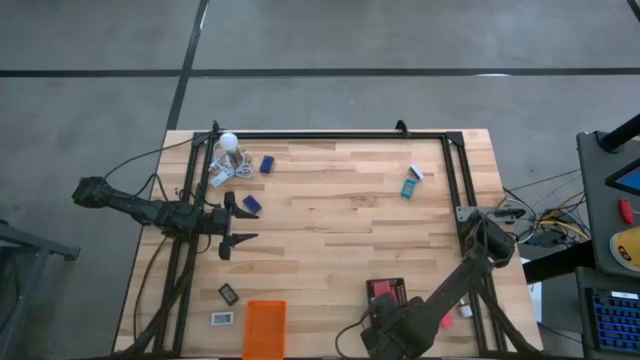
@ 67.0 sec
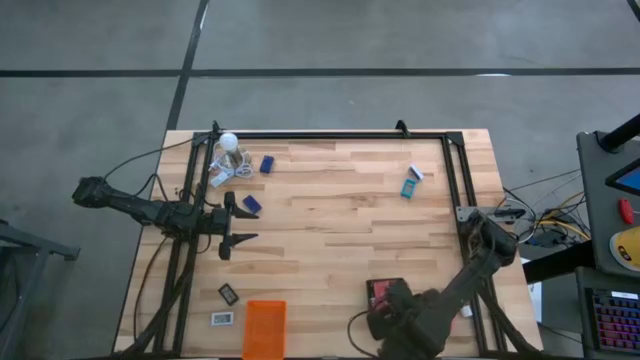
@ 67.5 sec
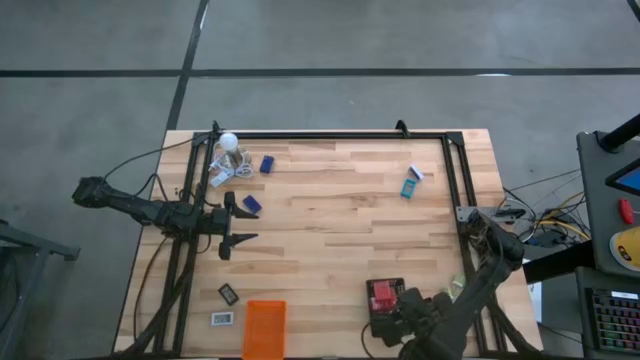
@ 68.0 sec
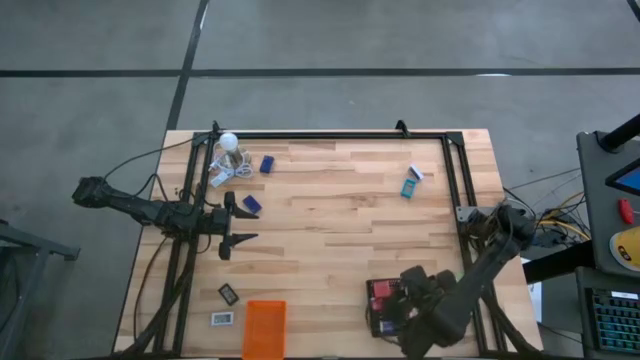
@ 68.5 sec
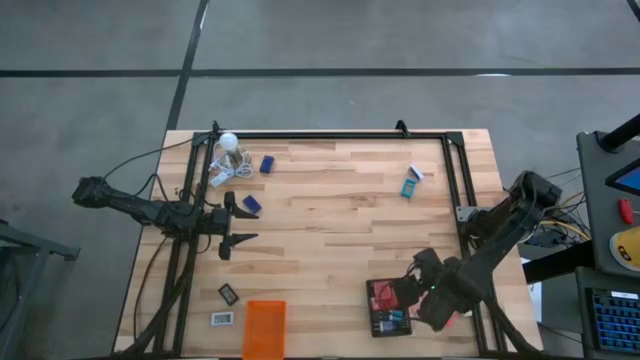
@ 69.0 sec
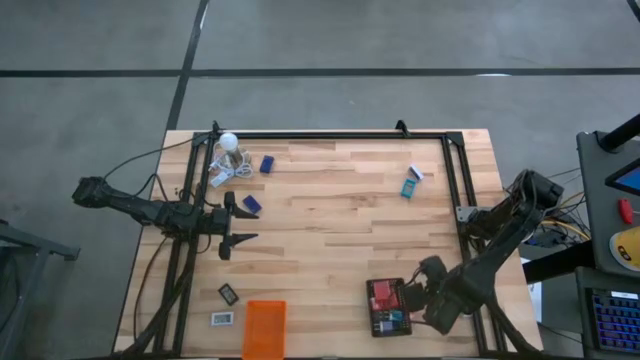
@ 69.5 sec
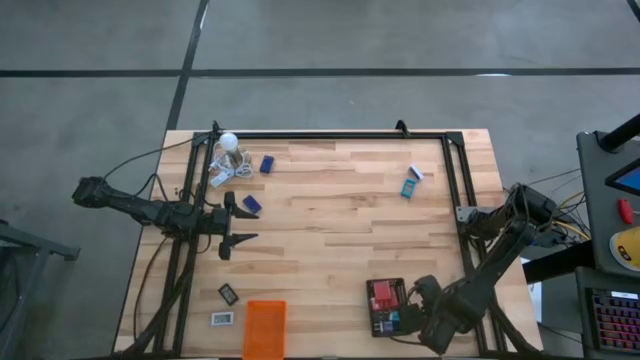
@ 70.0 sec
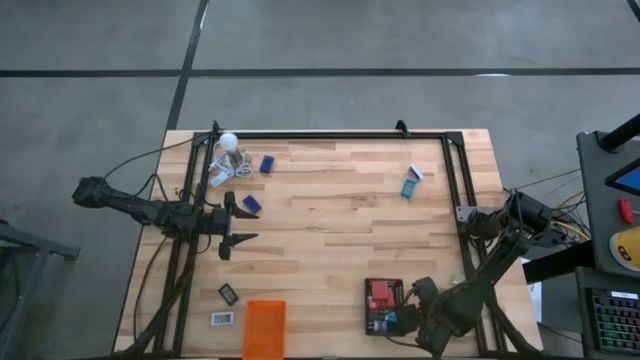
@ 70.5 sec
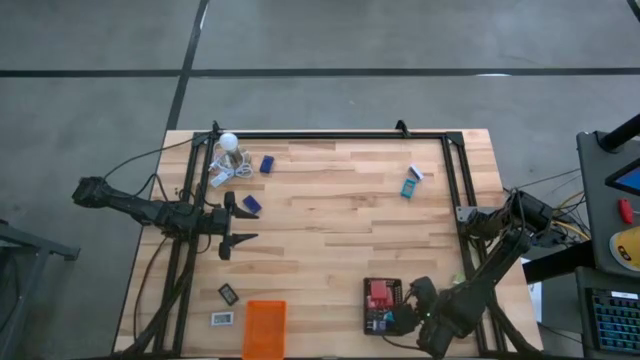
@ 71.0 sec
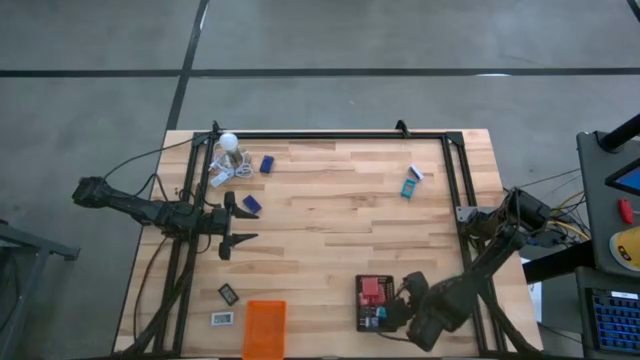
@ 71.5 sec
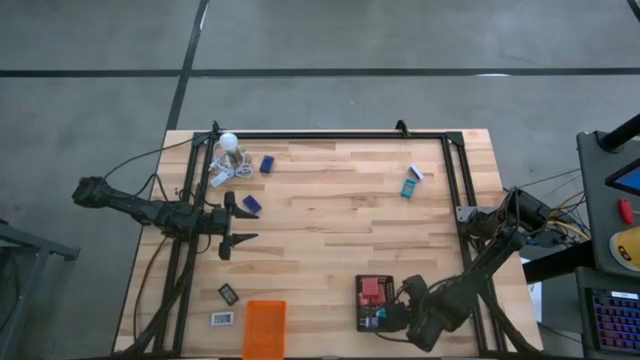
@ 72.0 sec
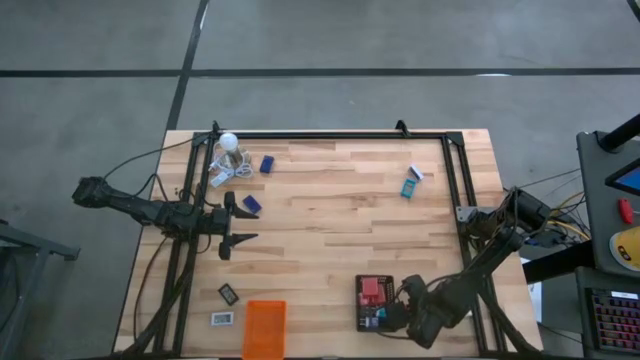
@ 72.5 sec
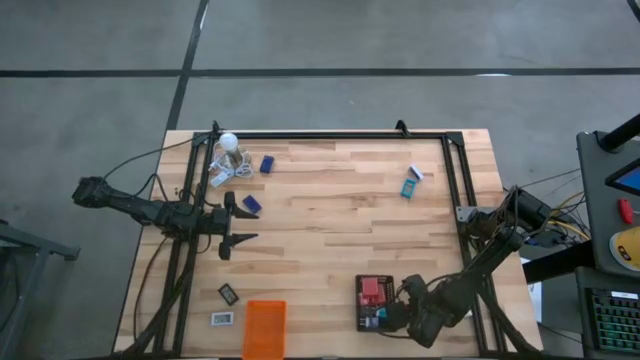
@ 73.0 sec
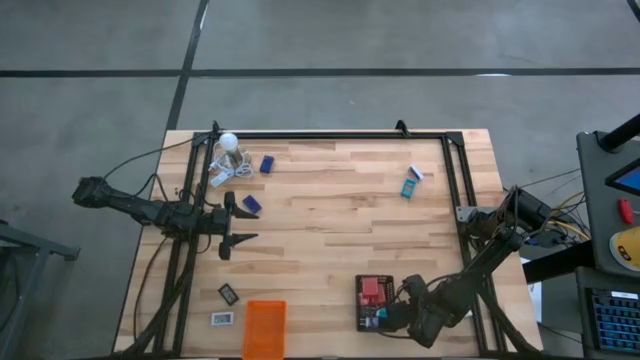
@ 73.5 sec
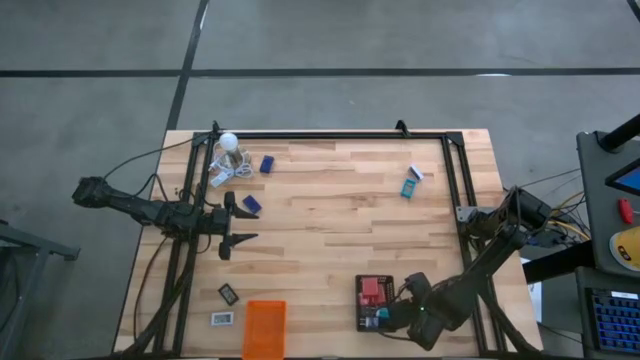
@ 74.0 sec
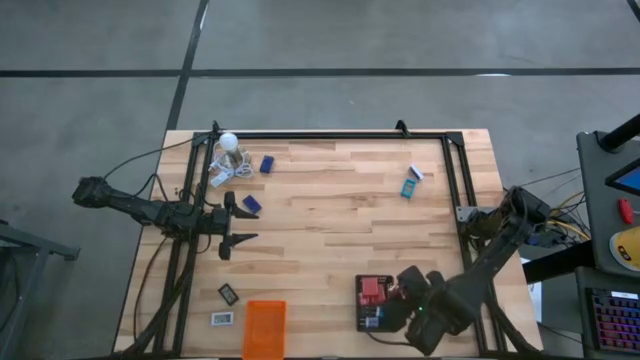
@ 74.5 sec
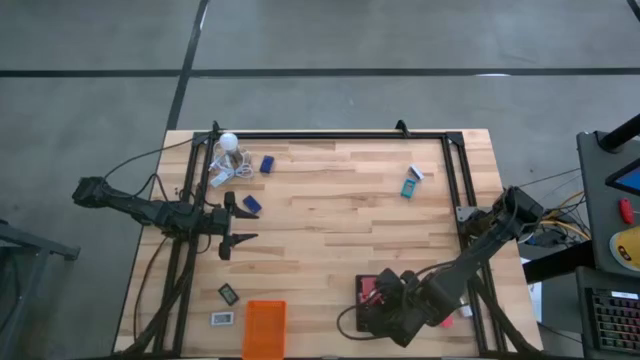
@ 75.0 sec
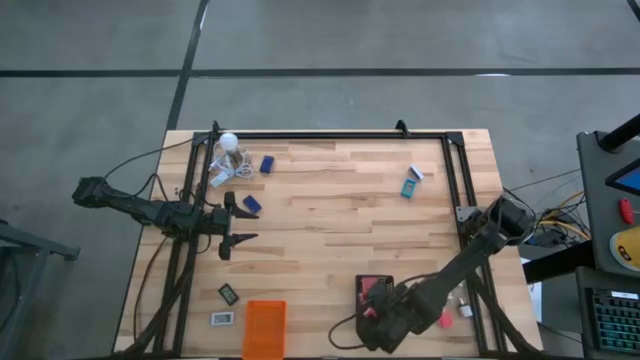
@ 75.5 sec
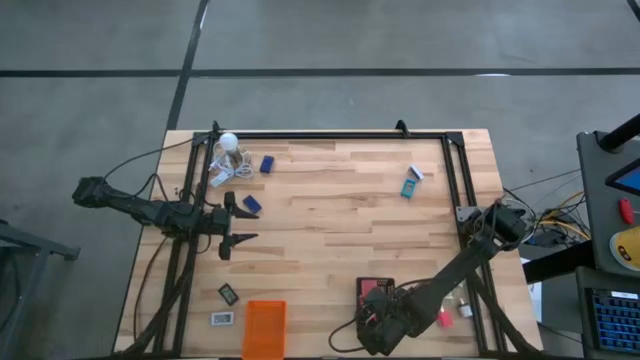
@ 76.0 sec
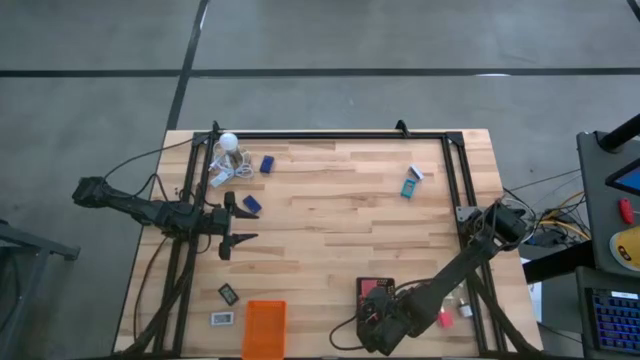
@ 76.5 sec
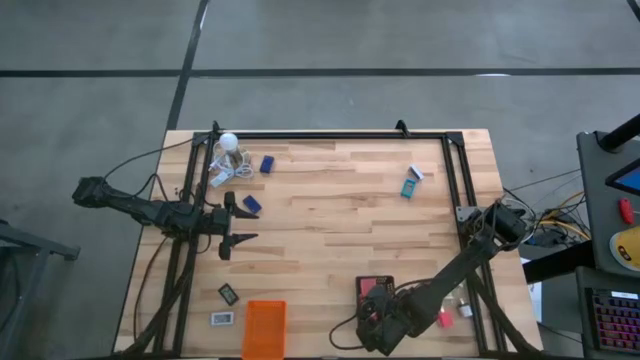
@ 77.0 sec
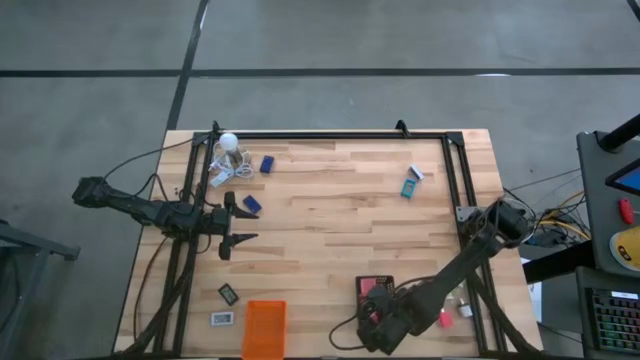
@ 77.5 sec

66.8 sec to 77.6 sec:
Task: Pick & Place Office items
Put the pink white charger adapter into the black bin

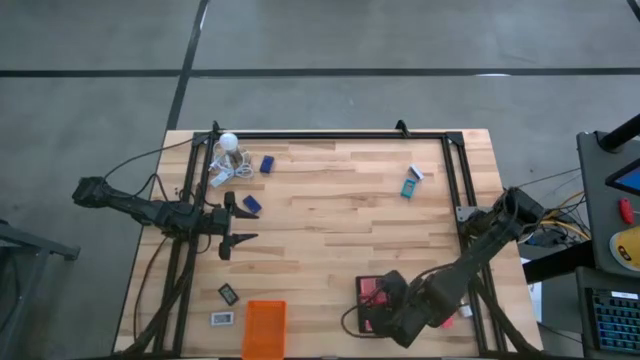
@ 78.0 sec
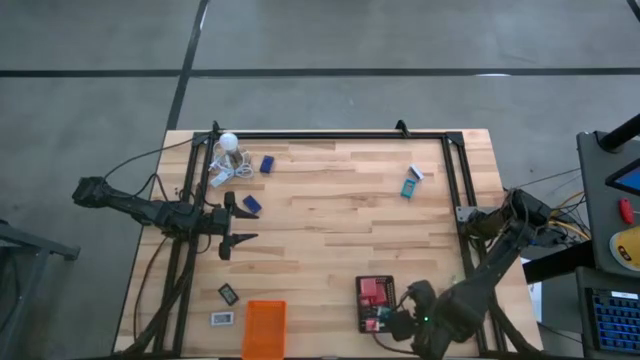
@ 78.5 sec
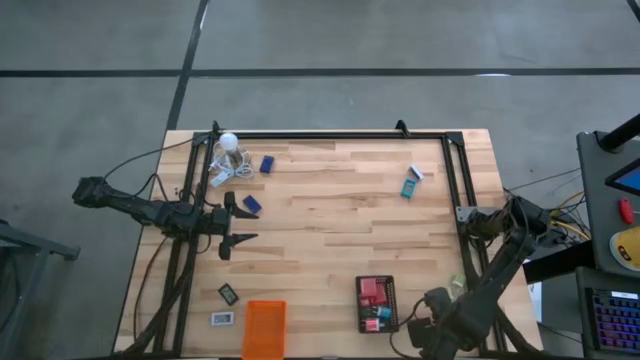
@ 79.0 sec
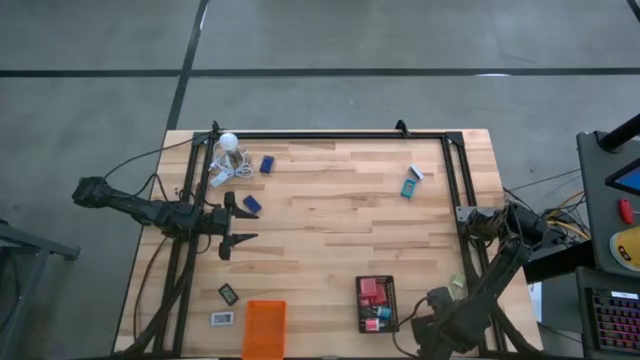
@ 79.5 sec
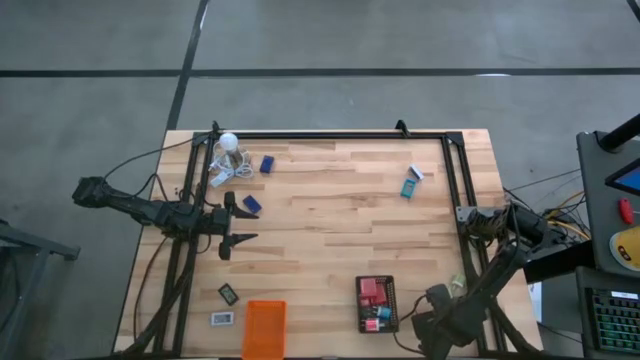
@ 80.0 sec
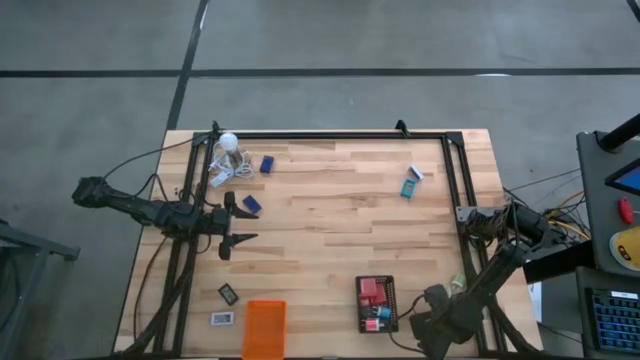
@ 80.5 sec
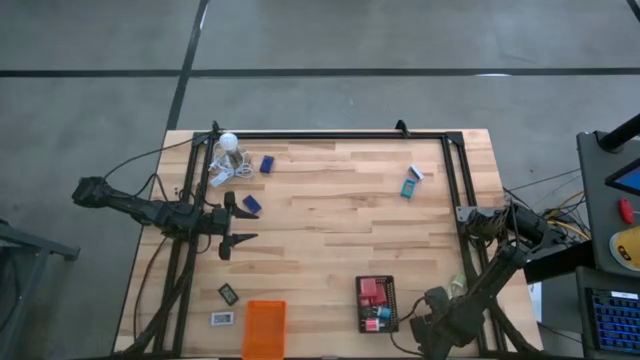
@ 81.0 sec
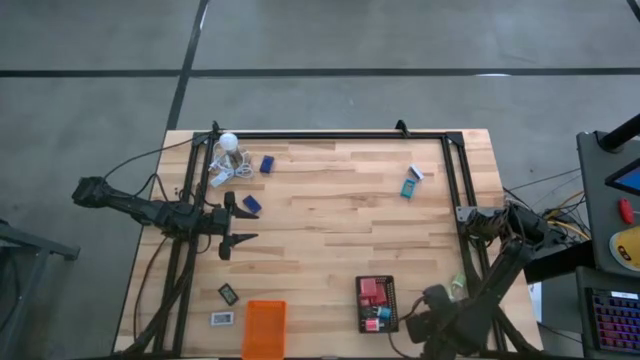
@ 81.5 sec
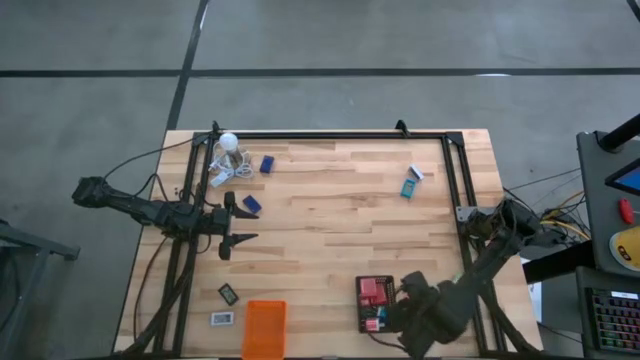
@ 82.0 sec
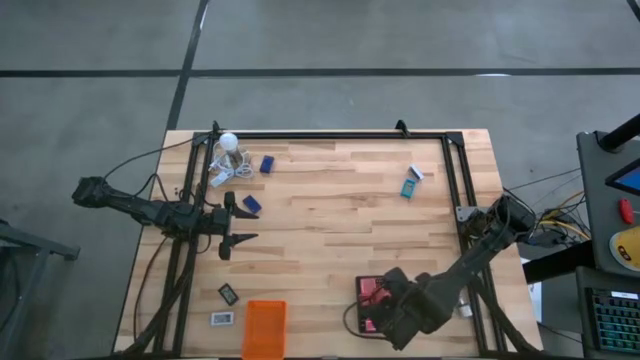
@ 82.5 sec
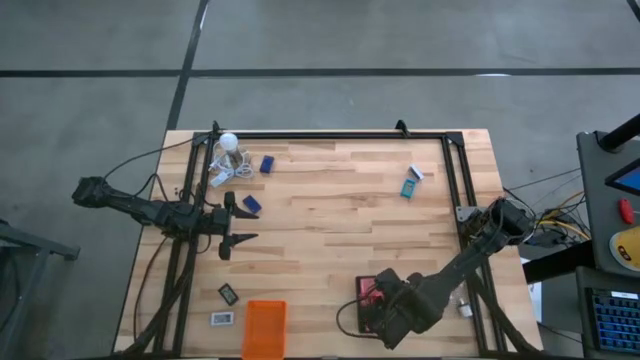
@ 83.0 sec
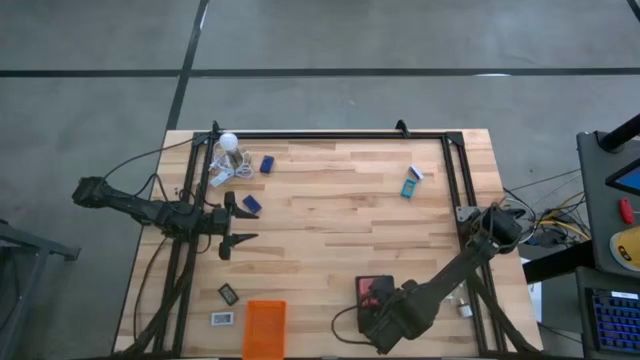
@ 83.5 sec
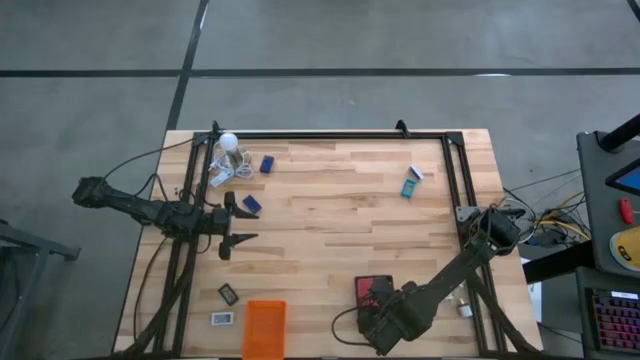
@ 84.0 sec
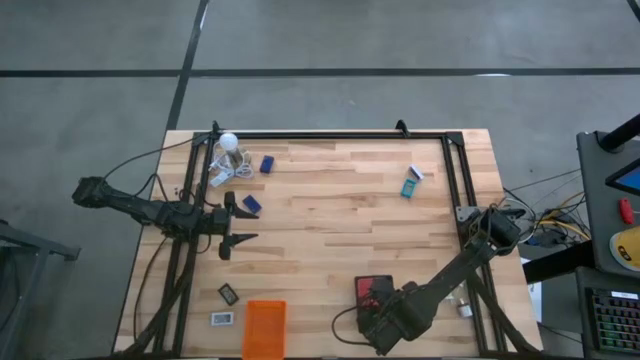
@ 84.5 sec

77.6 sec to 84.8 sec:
Put the pink charger adapter into the black bin
